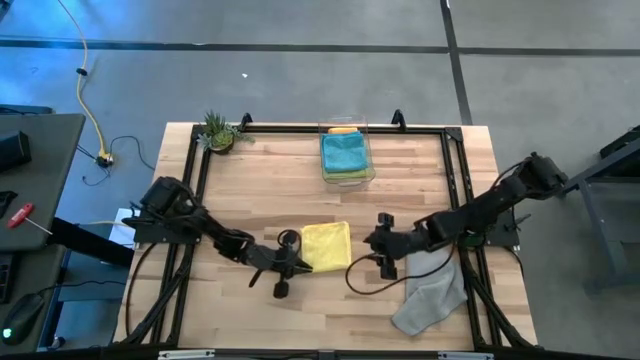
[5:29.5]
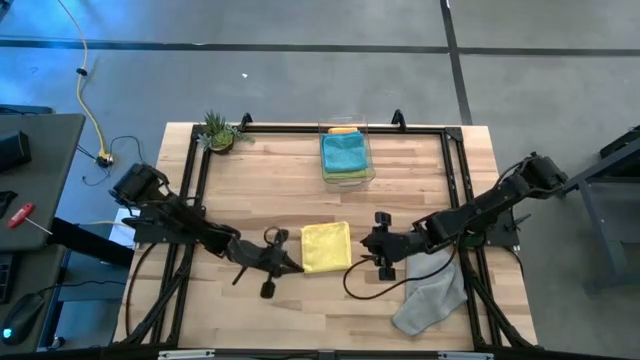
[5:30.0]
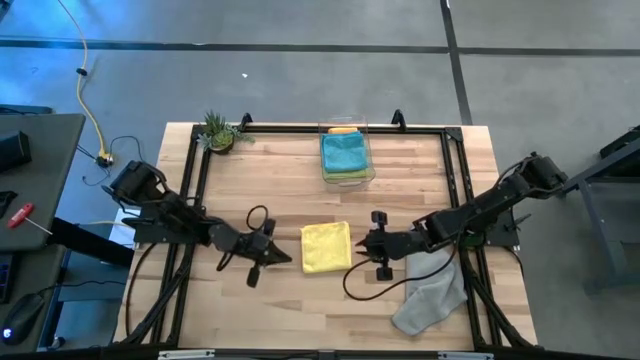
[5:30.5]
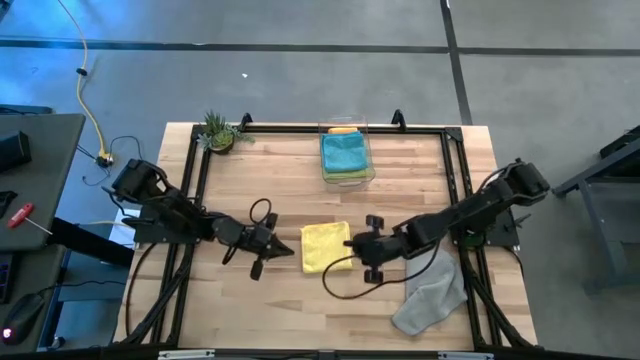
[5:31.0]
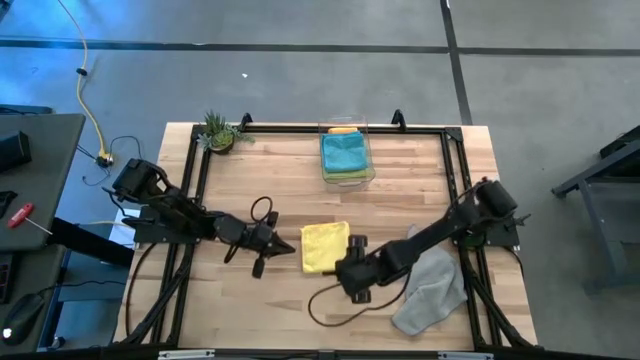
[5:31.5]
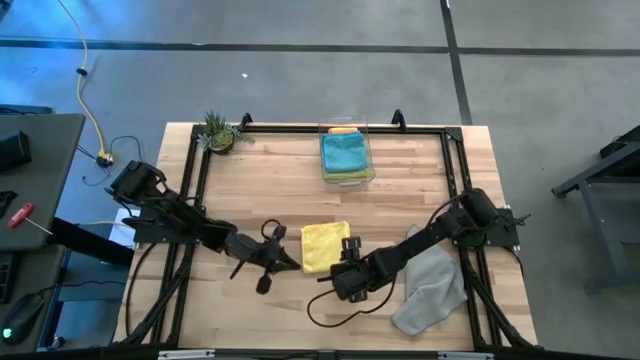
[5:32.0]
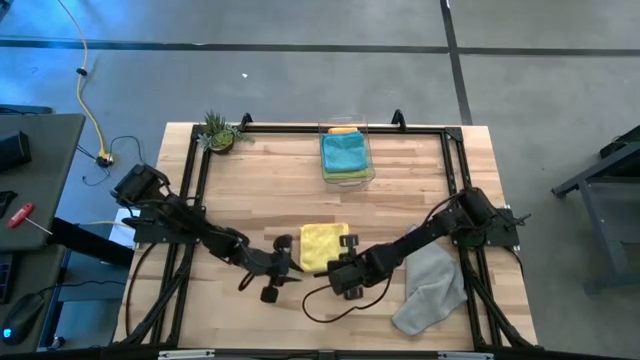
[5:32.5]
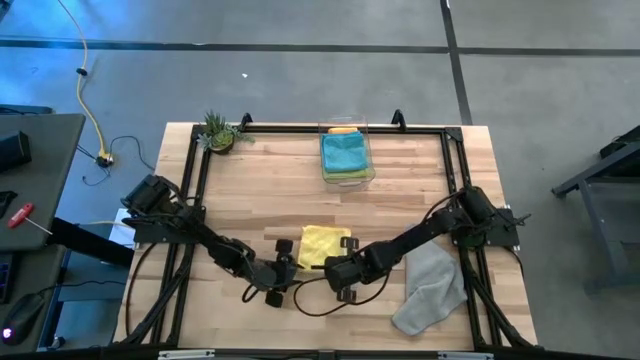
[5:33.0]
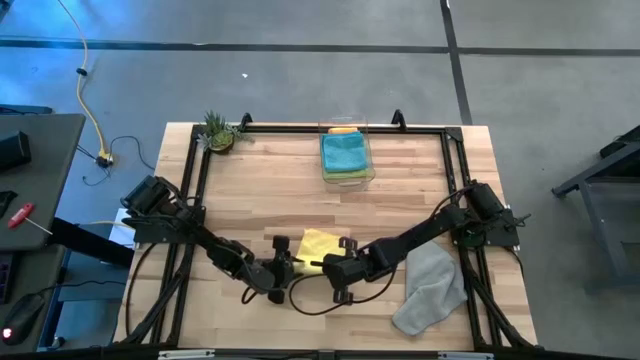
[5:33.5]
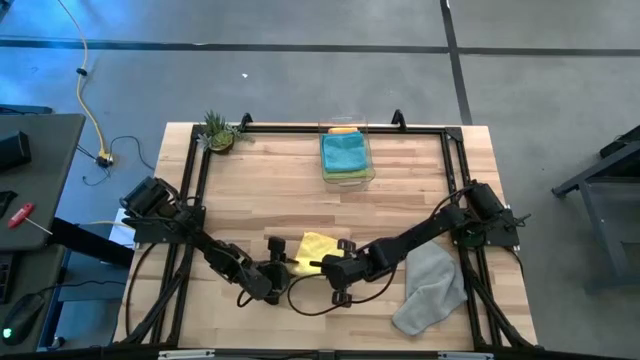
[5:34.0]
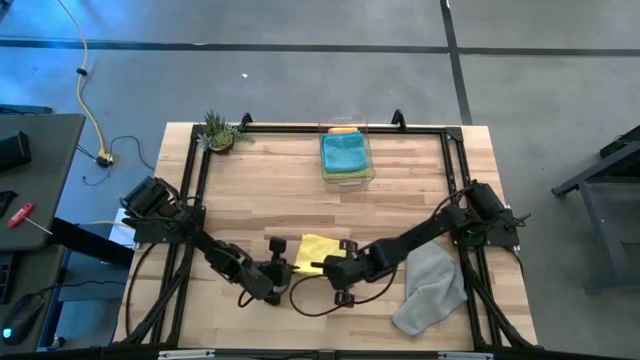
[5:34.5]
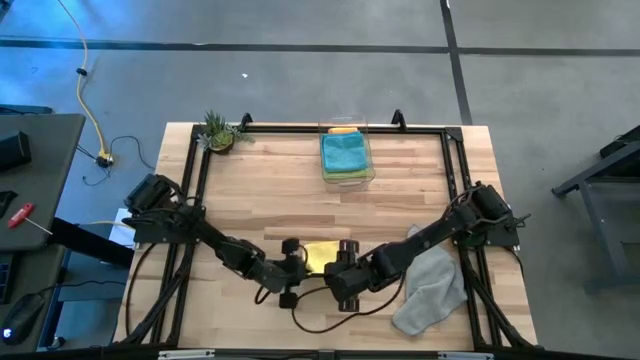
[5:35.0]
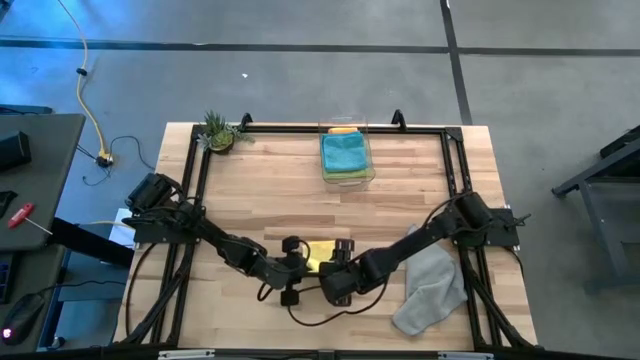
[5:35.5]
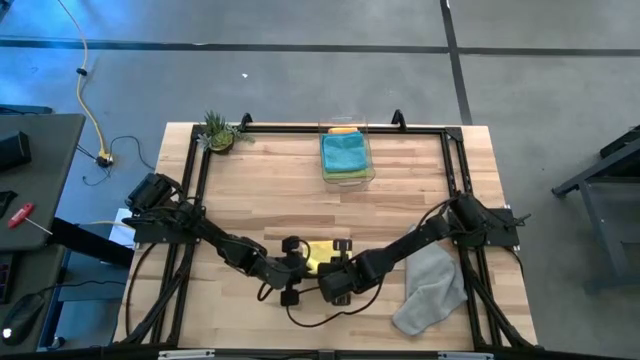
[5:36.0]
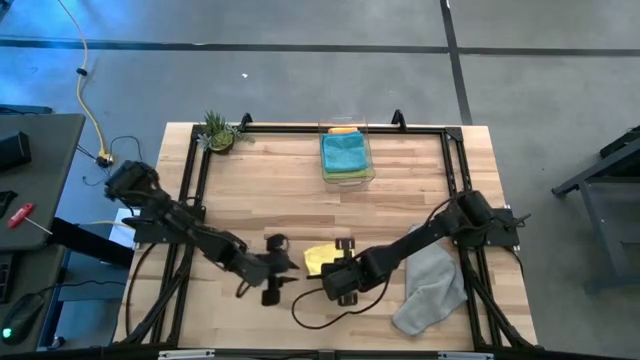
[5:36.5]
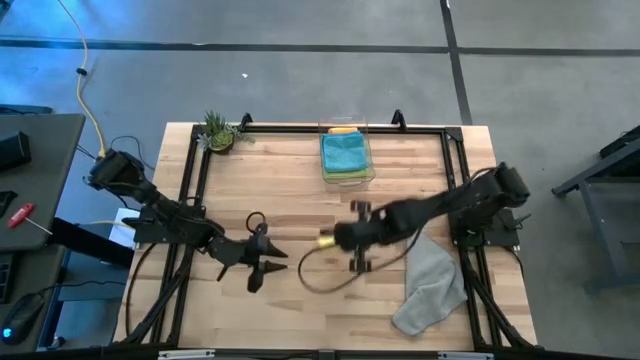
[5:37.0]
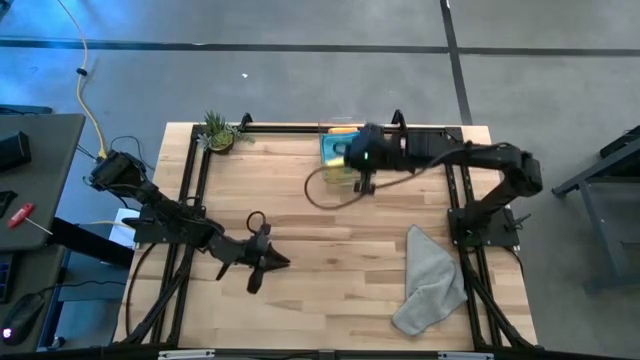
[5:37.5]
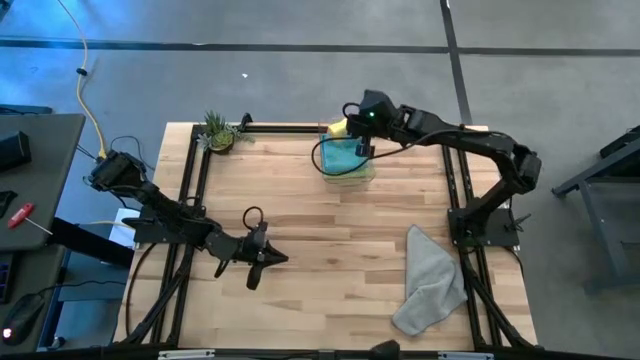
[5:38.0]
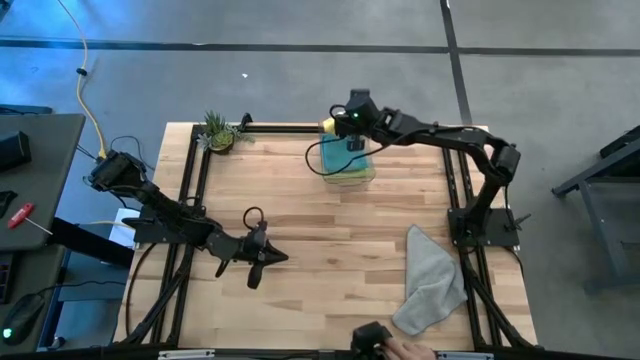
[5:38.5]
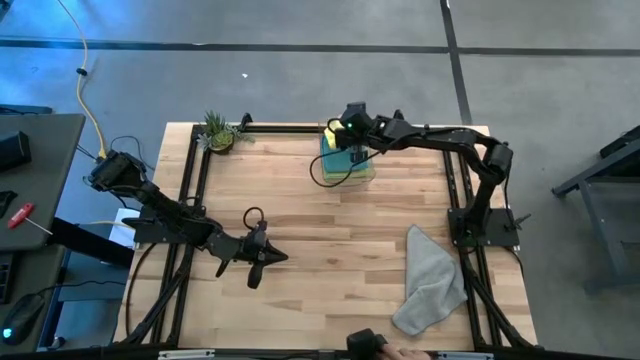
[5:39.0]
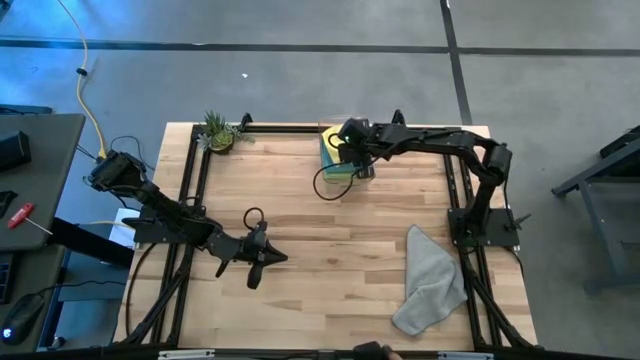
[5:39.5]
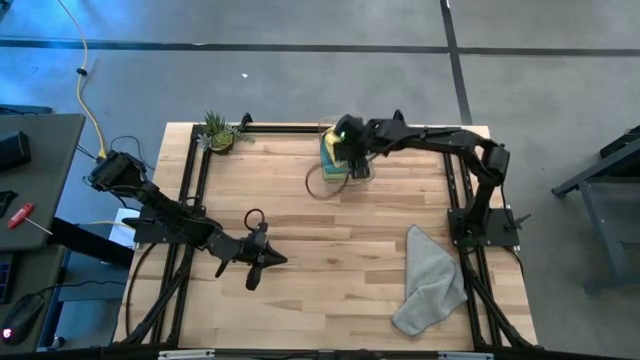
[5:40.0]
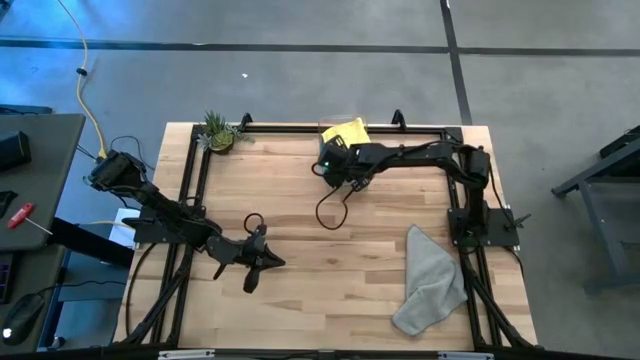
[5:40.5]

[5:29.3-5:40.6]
Task: Fold microfiber towels
Stack the yellow microfiber cloth on top of the blue microfiber cloth in the transparent bin

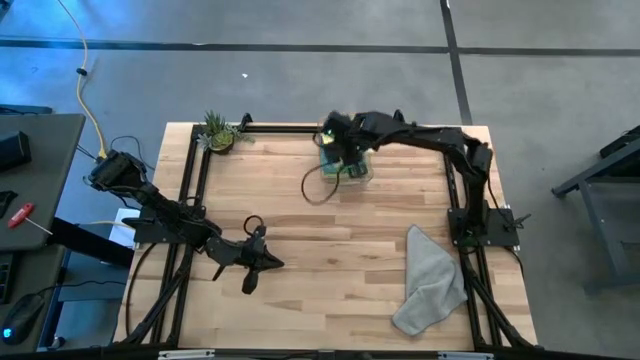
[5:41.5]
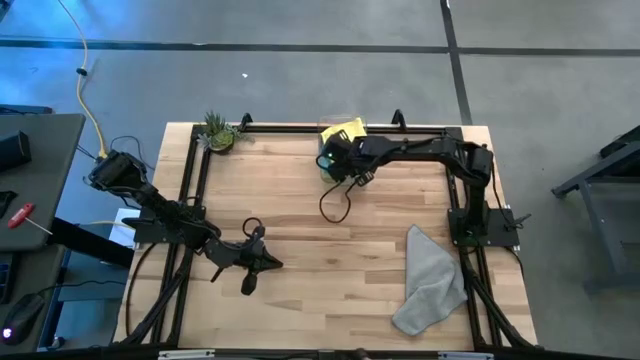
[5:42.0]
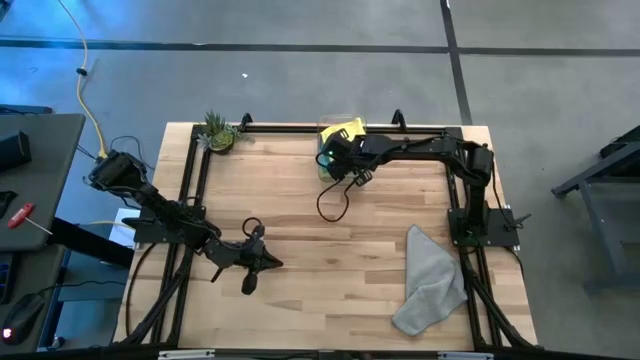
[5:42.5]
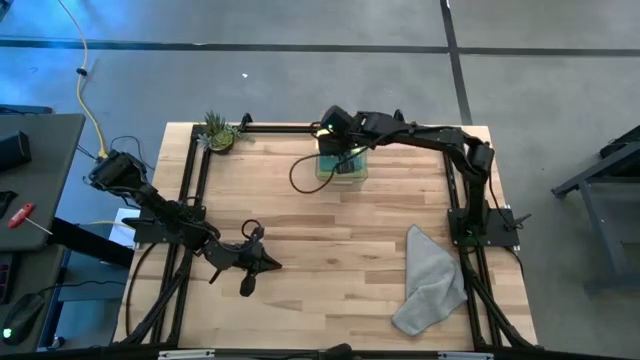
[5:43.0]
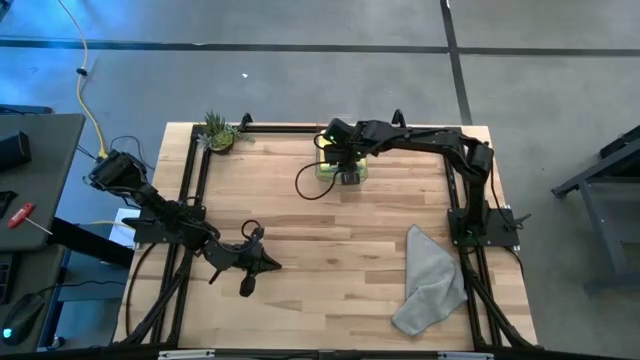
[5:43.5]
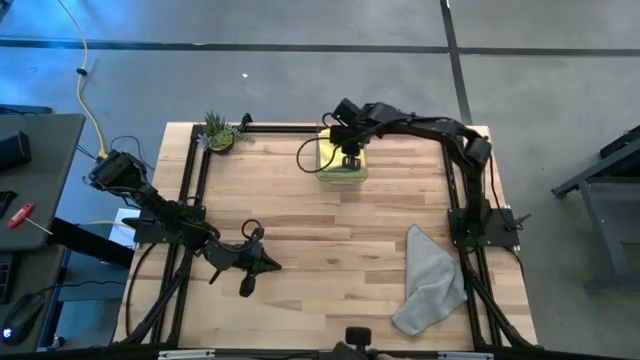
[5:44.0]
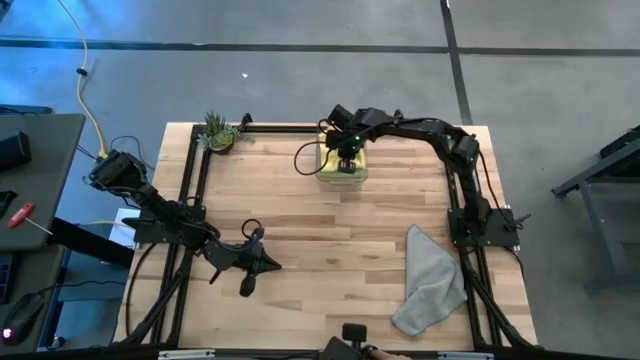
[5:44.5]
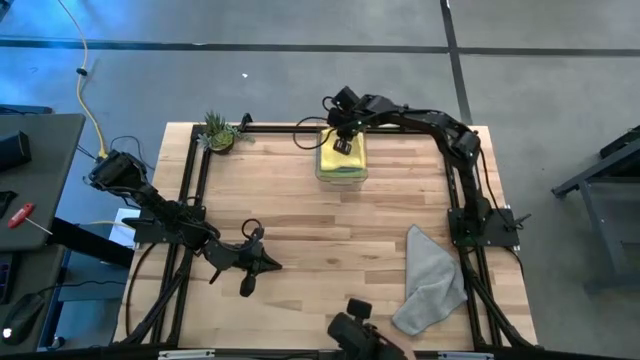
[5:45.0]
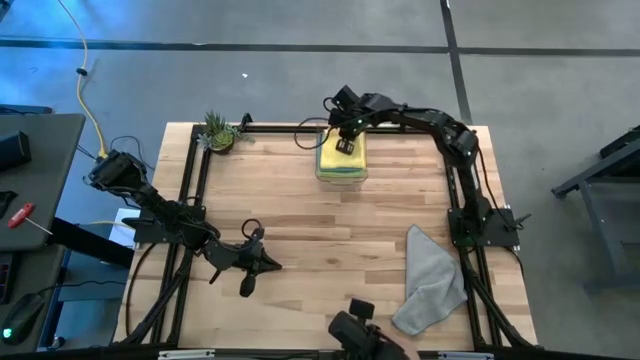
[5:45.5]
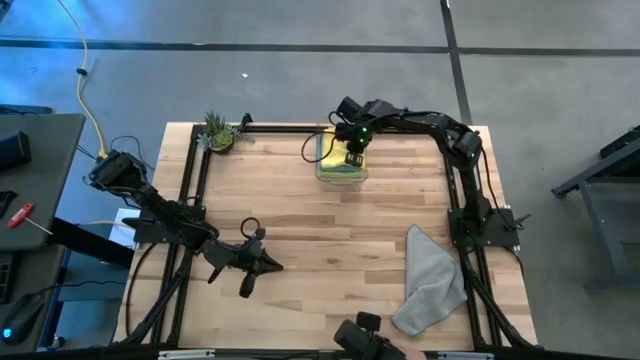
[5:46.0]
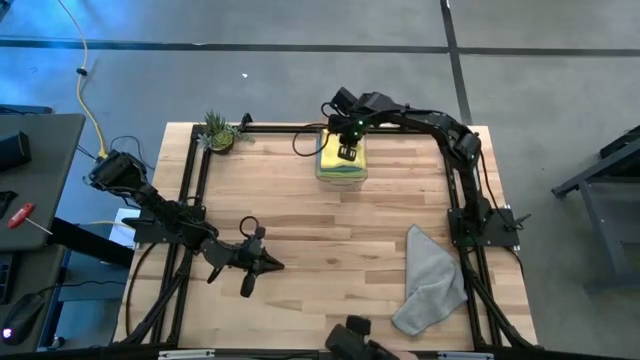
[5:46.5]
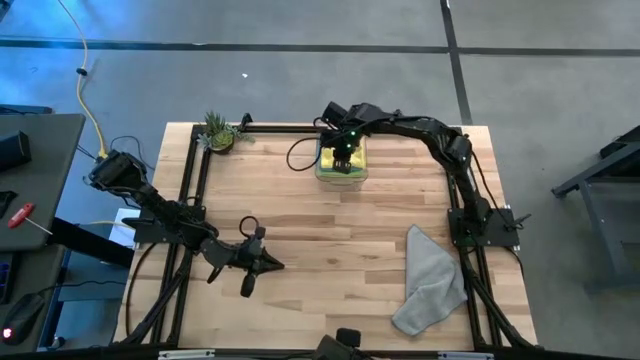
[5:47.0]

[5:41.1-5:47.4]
Stack the yellow microfiber cloth on top of the blue microfiber cloth in the transparent bin

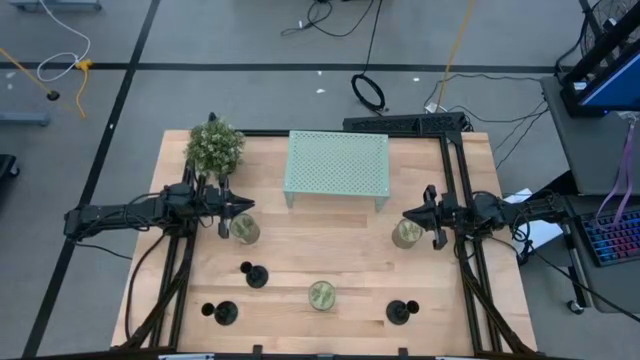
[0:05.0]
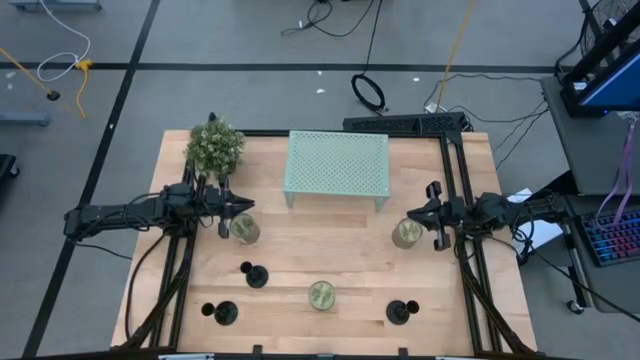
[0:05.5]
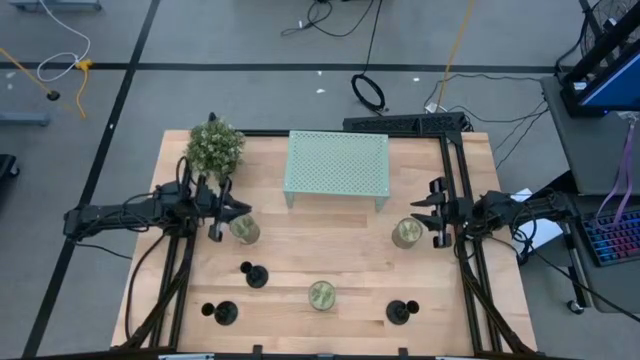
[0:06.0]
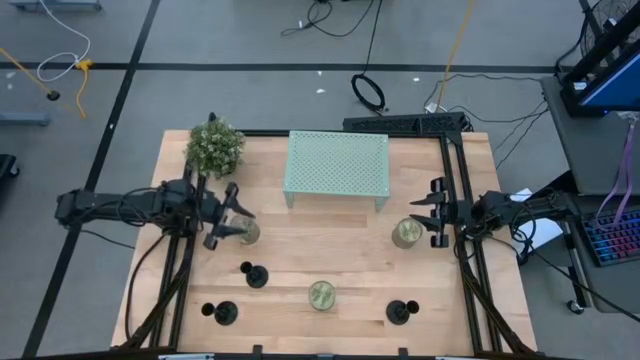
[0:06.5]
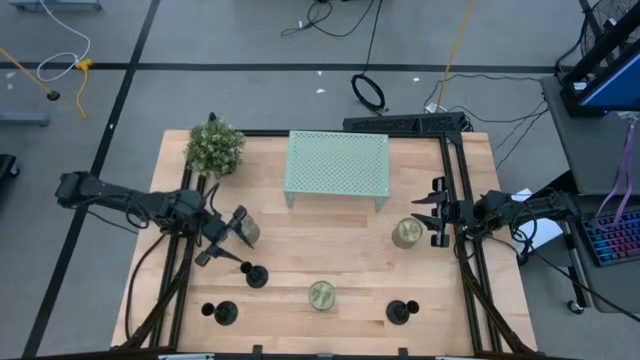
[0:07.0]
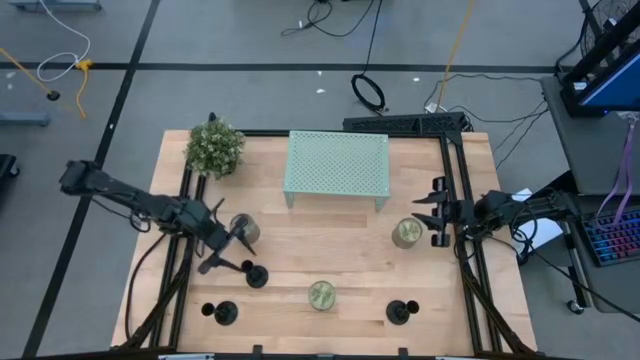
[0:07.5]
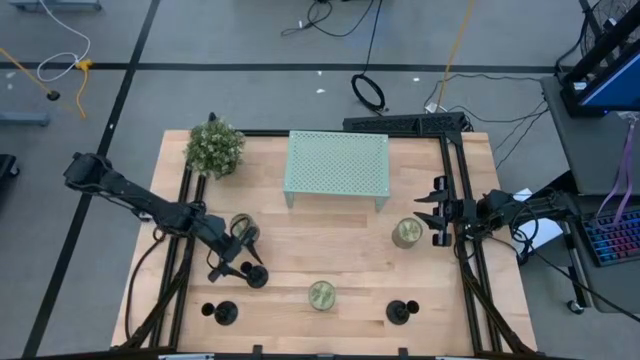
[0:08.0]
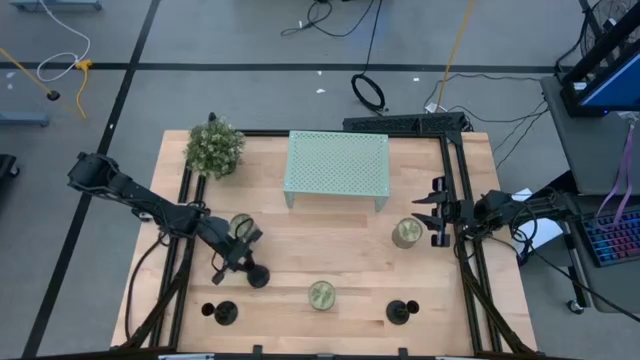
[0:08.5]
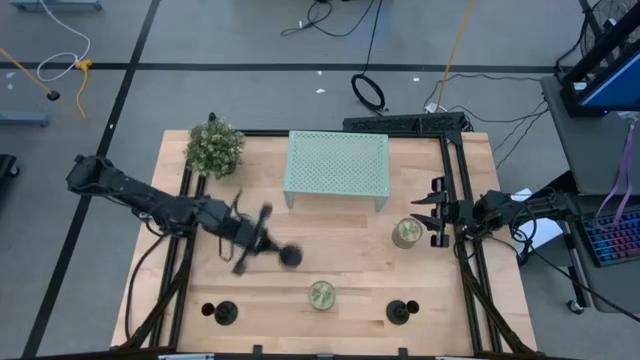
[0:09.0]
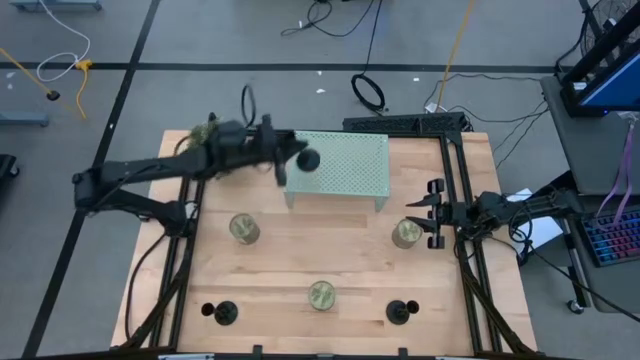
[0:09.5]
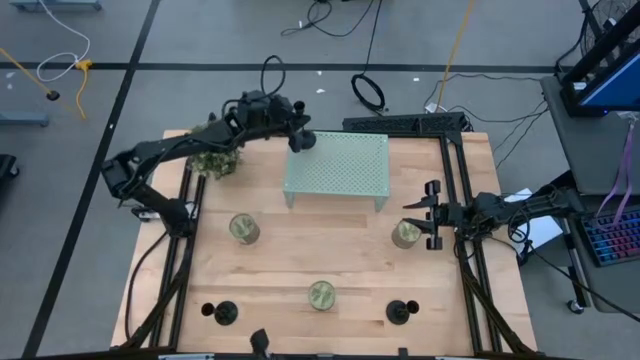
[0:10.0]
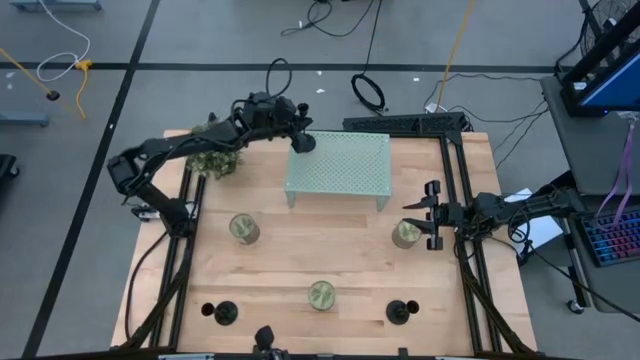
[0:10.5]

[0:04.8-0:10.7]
Task: Pick & Place candle stick holders
Put the middle candle holder on the shelf
